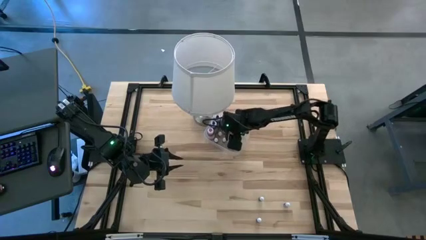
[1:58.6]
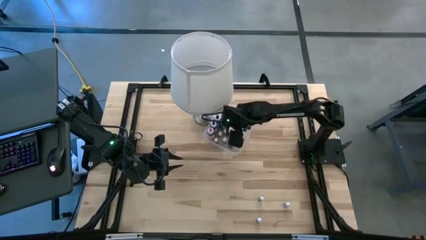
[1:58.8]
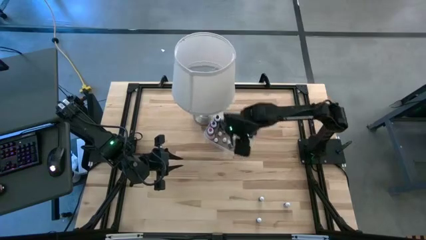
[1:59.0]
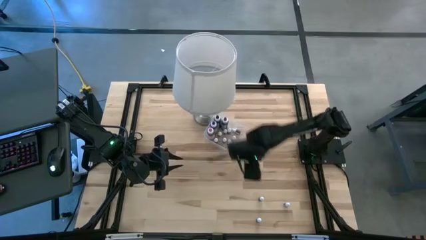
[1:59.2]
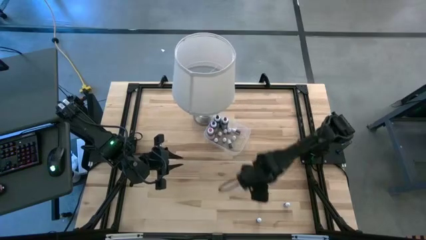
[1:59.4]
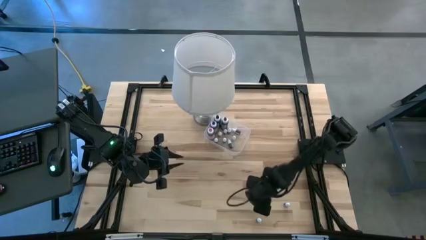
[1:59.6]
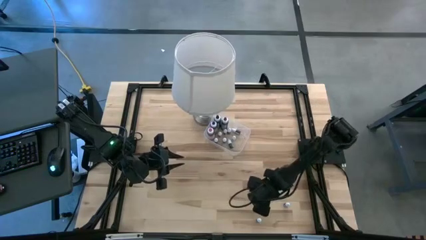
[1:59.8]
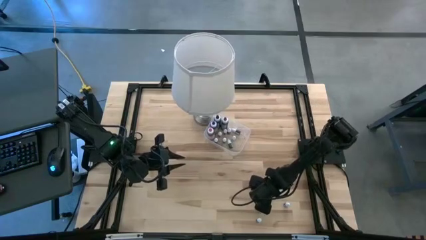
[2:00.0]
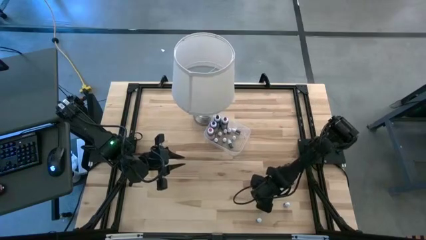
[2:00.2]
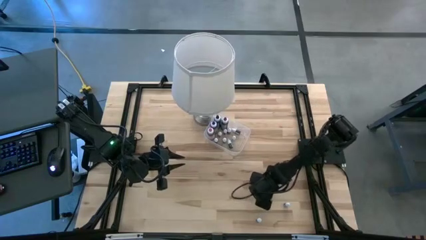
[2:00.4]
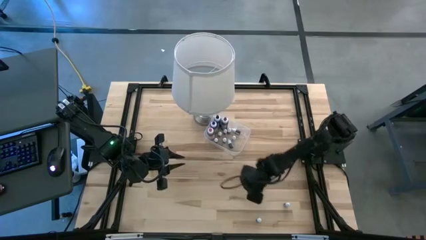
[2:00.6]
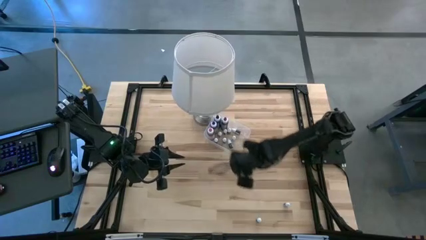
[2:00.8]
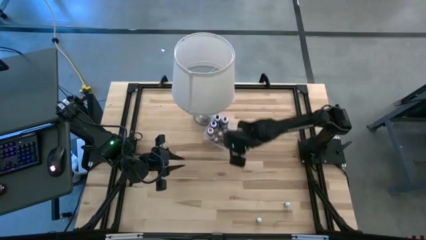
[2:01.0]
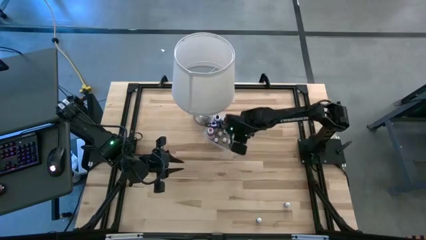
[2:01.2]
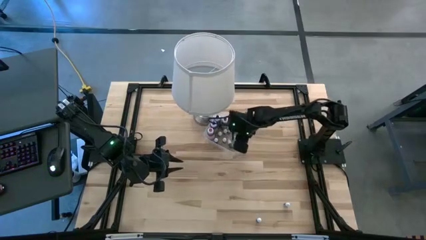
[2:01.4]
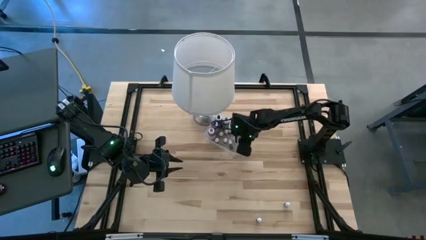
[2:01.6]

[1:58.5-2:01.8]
Task: Pick & Place food coloring
Put the small black food coloring bottle into the transparent bin

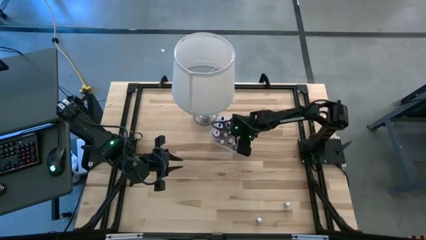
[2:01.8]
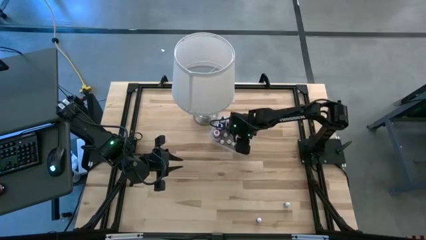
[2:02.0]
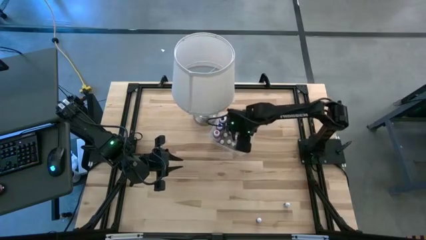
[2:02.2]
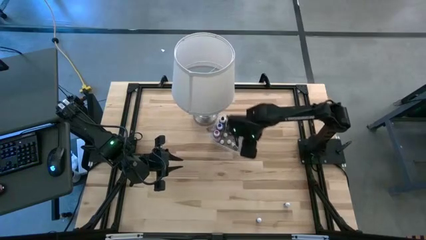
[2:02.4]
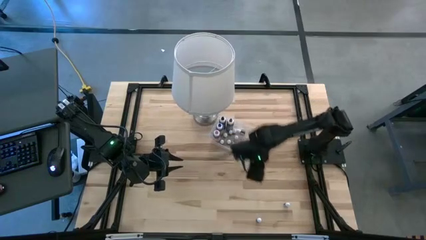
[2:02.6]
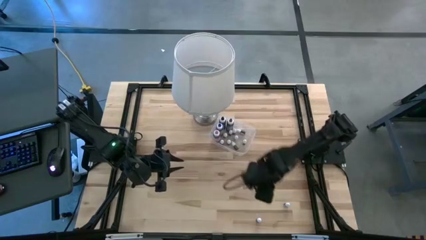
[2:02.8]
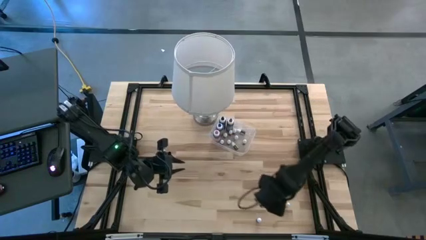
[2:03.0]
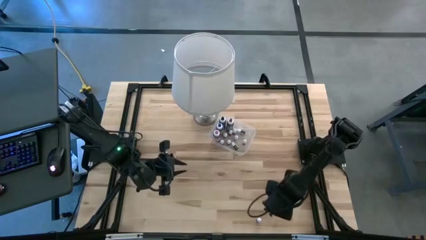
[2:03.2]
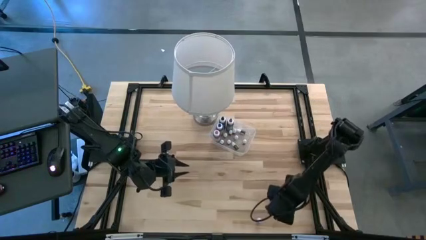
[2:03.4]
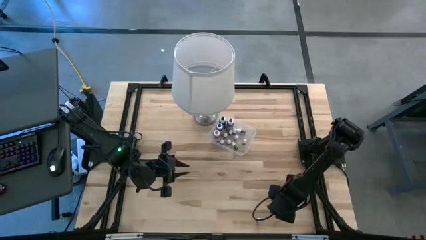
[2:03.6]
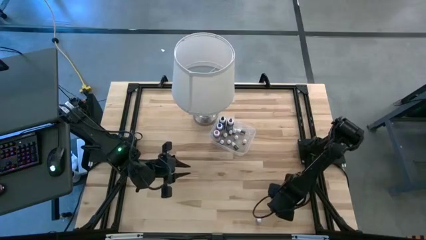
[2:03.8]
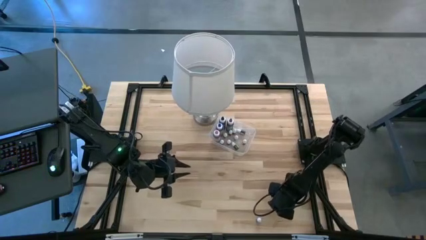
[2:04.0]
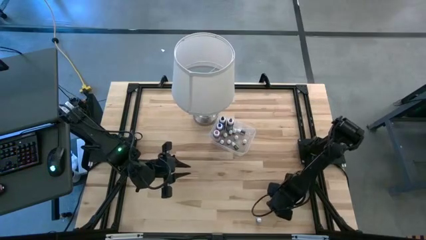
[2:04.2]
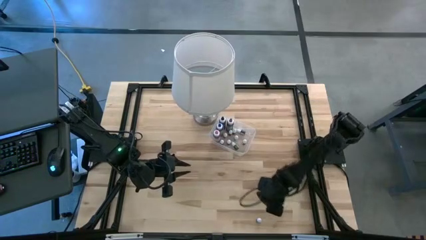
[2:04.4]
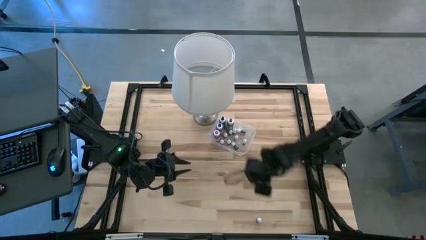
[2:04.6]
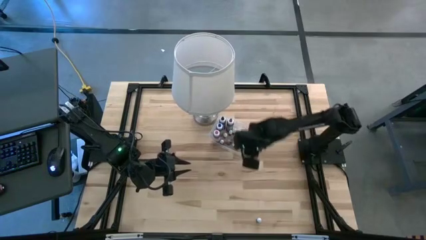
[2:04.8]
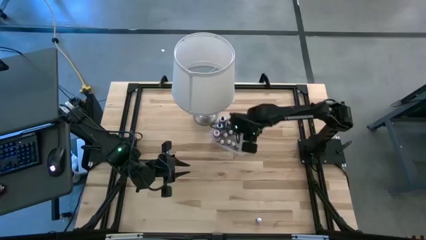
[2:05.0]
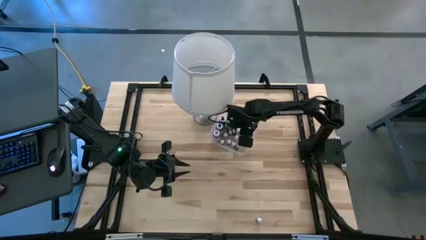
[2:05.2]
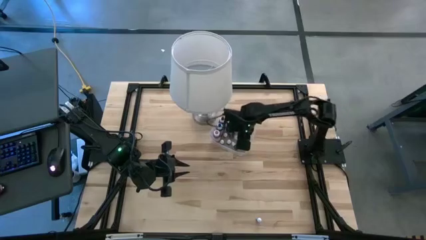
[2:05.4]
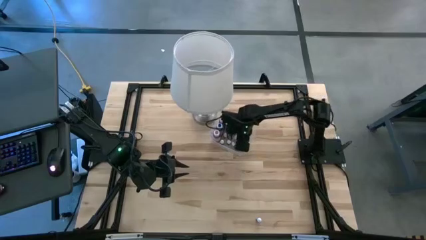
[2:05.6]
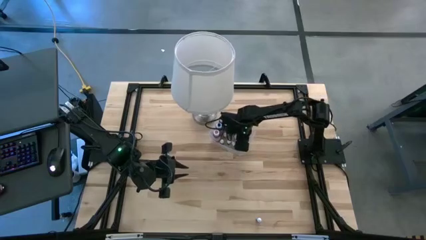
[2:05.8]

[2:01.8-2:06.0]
Put the small violet food coloring bottle into the transparent bin

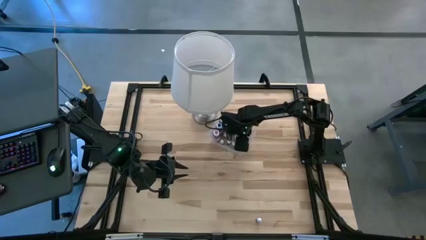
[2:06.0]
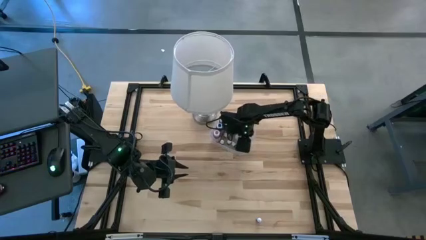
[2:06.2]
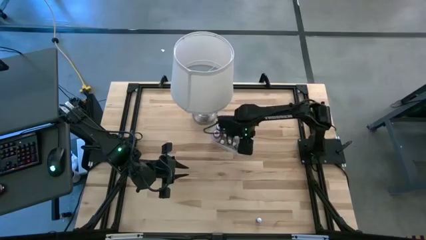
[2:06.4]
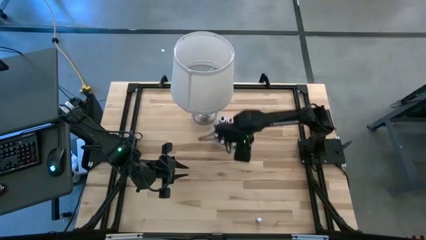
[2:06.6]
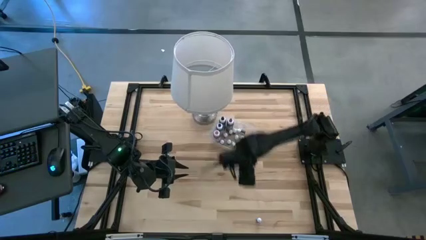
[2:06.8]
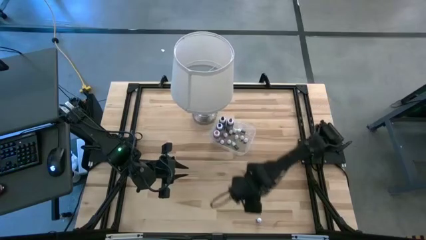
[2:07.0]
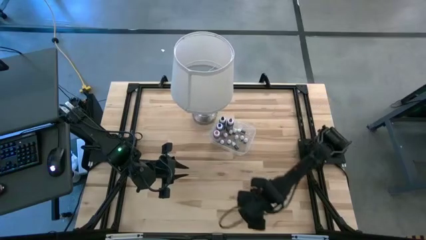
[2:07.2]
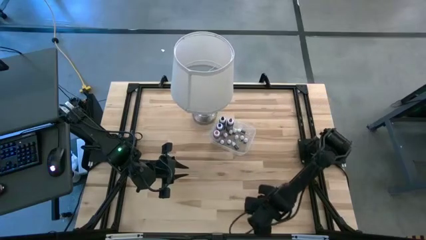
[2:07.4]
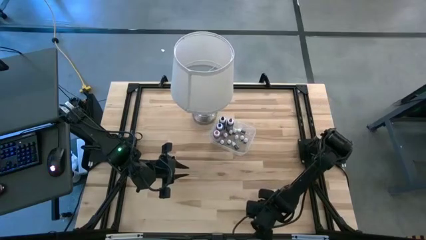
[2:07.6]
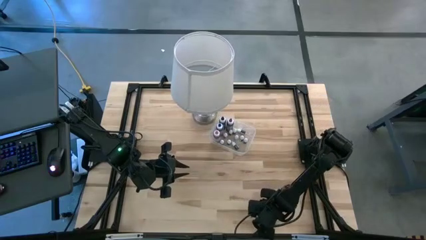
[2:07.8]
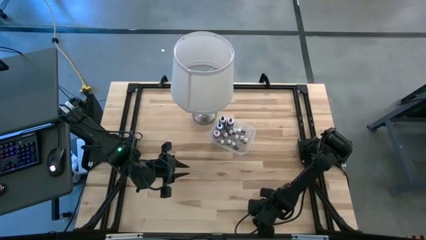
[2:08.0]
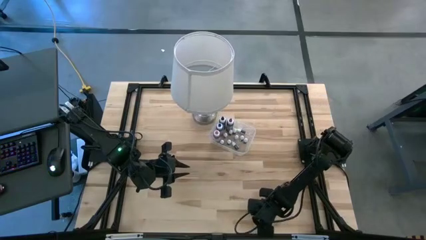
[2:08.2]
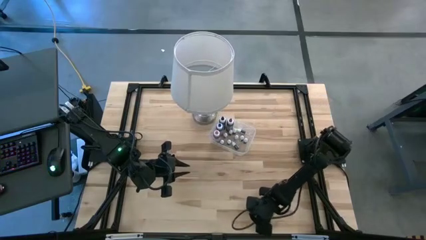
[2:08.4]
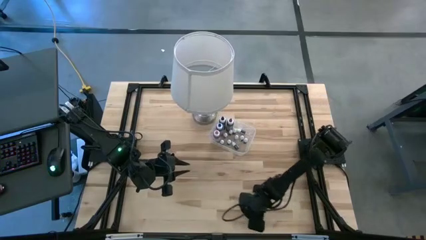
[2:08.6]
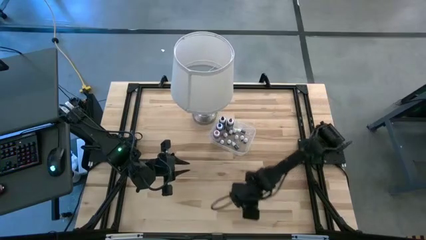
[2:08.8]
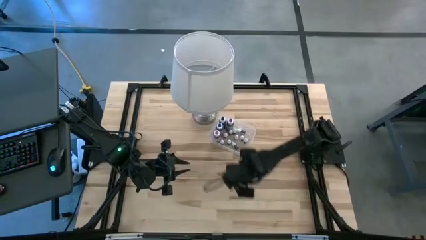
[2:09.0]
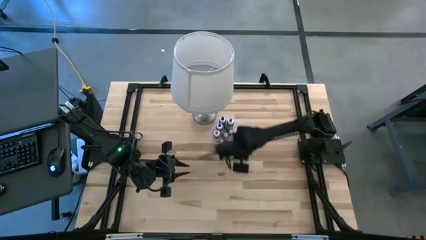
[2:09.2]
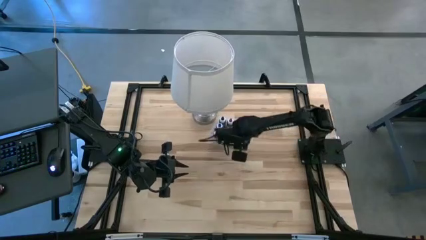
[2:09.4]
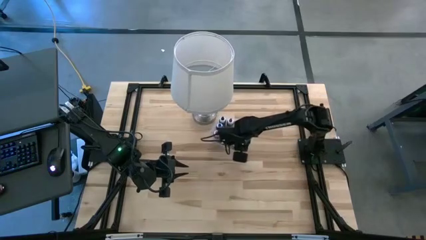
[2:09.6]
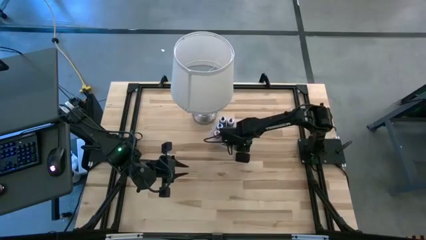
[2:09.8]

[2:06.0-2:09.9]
Put the small red food coloring bottle into the transparent bin

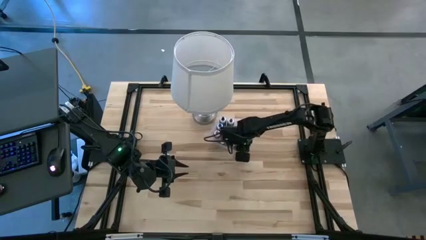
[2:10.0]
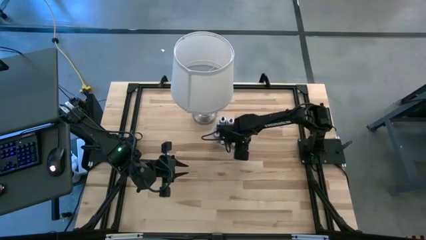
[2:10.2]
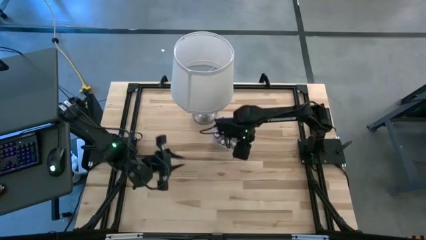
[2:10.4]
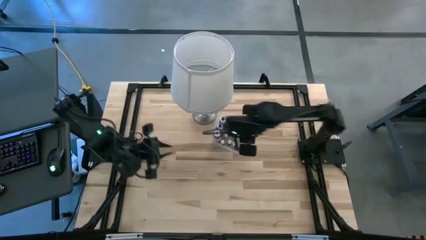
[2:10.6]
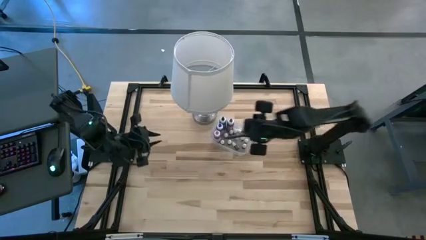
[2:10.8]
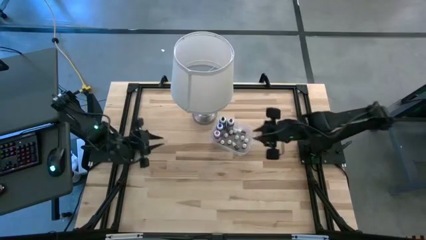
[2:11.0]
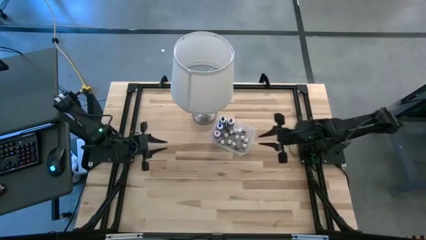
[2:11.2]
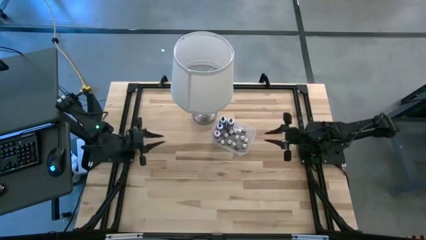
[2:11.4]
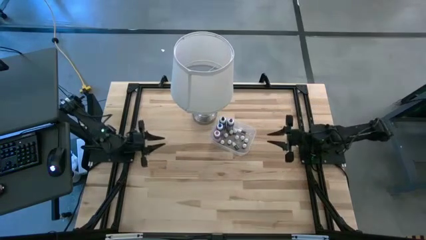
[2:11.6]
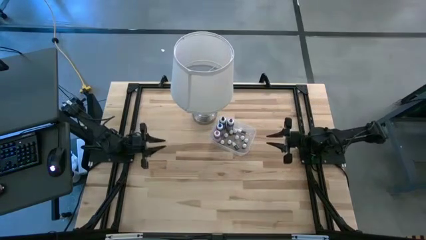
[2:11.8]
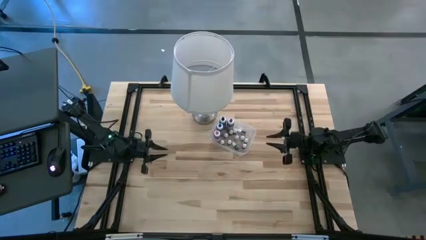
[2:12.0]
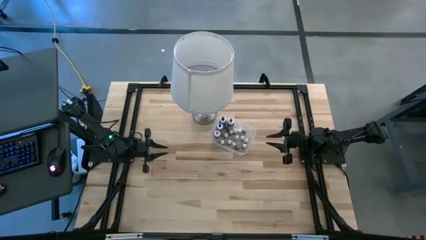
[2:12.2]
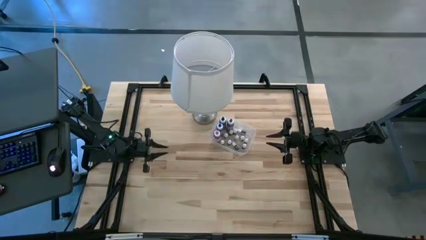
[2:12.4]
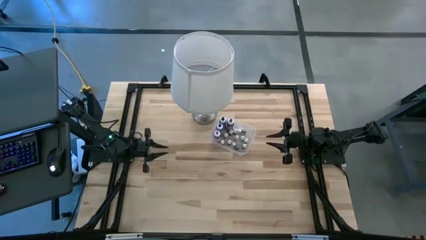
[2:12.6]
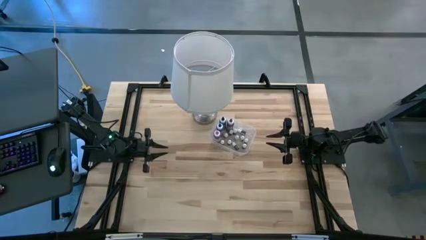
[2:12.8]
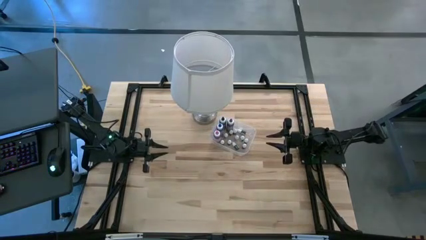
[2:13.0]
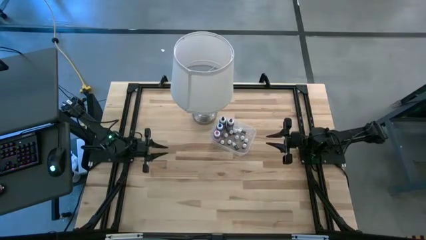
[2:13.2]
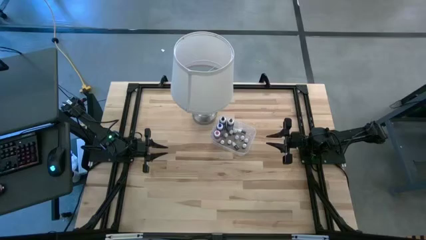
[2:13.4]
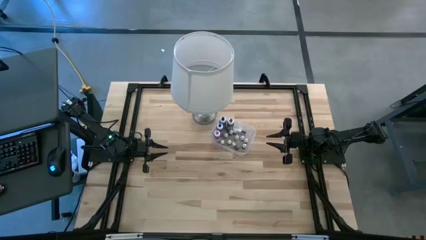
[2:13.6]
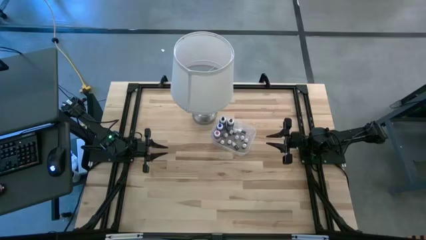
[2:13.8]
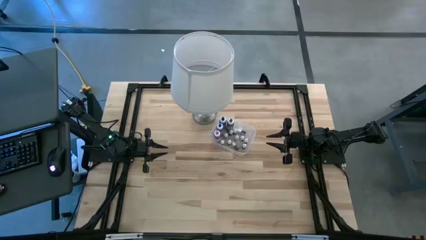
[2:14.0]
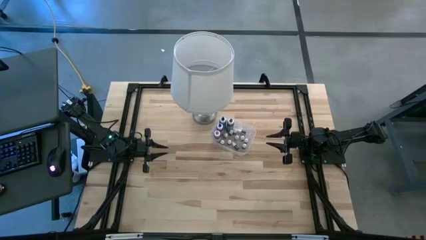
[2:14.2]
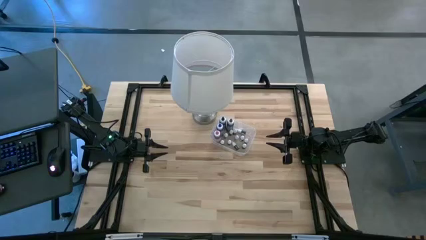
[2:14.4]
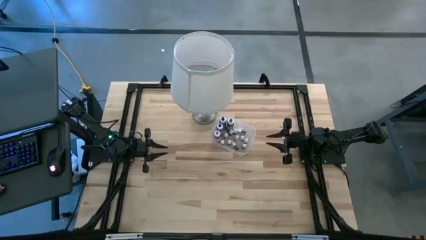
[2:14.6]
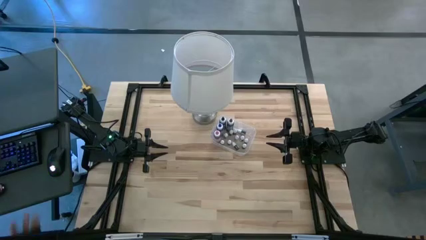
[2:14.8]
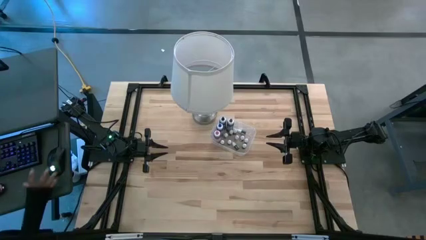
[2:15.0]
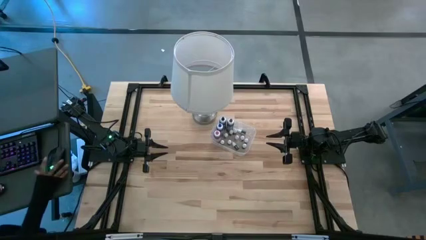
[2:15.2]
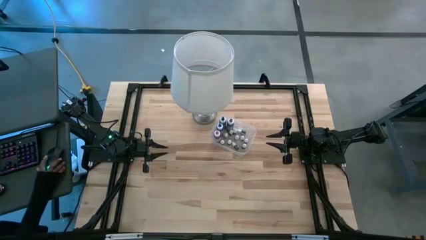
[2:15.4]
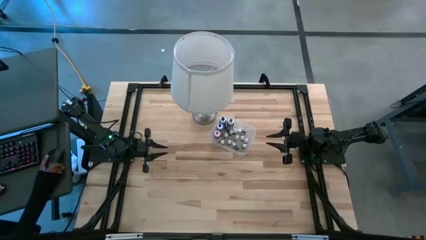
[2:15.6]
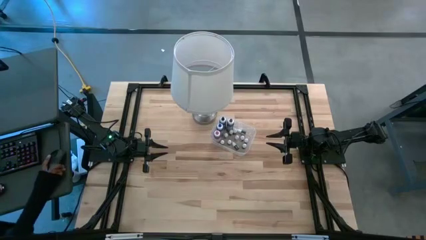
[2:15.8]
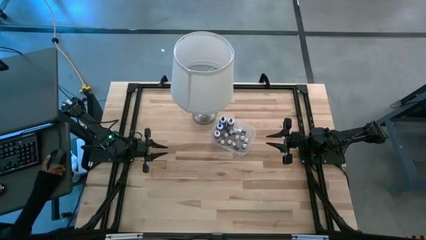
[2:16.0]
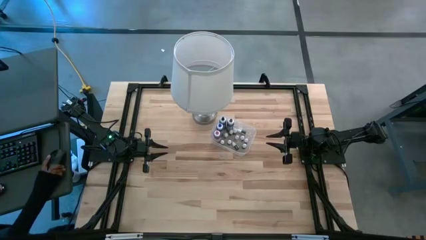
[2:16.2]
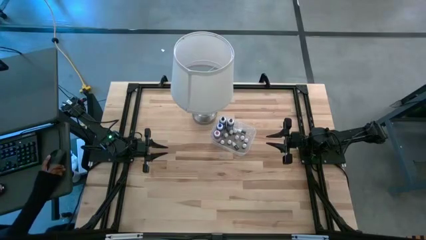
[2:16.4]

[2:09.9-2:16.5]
Return to Home Position
